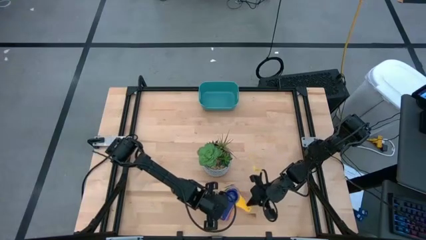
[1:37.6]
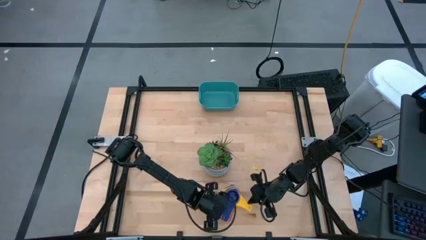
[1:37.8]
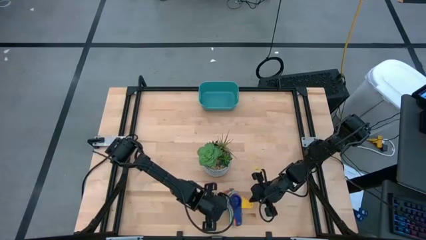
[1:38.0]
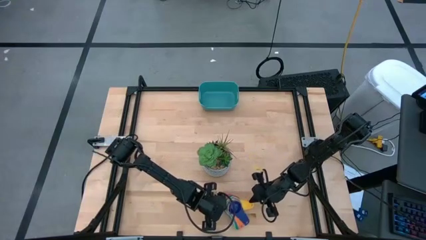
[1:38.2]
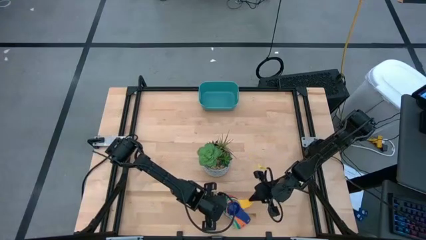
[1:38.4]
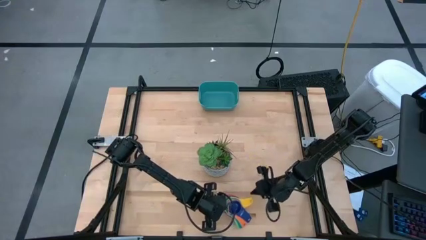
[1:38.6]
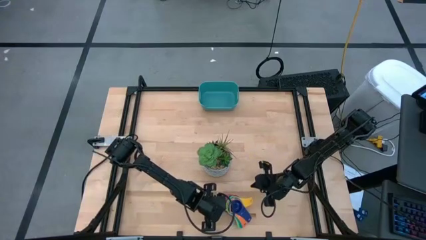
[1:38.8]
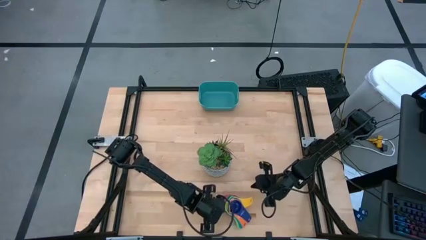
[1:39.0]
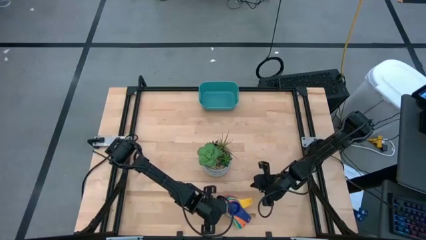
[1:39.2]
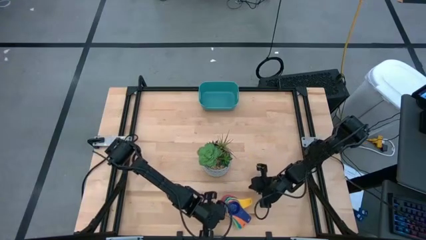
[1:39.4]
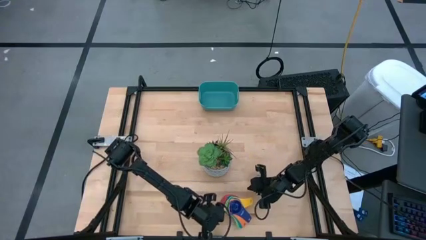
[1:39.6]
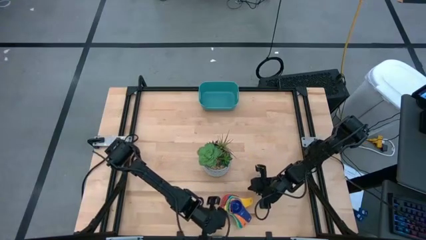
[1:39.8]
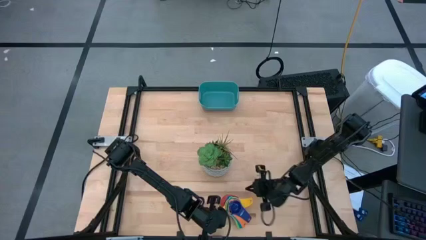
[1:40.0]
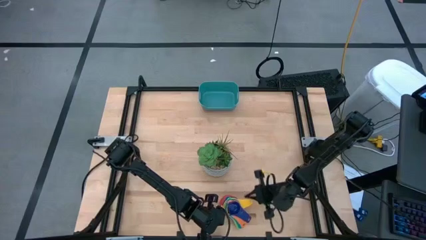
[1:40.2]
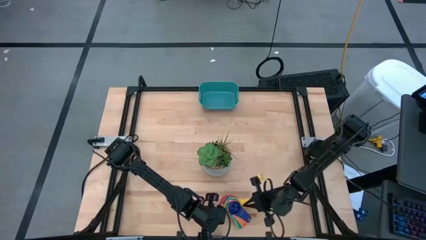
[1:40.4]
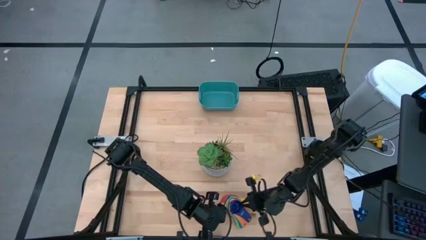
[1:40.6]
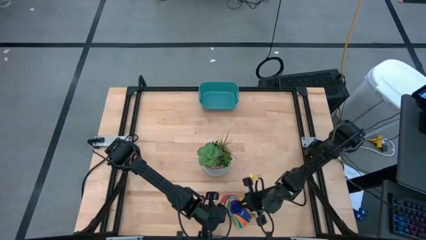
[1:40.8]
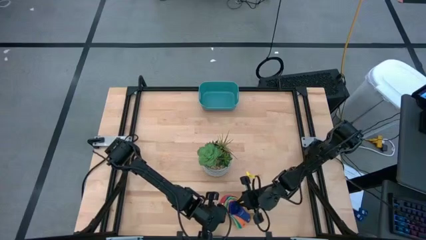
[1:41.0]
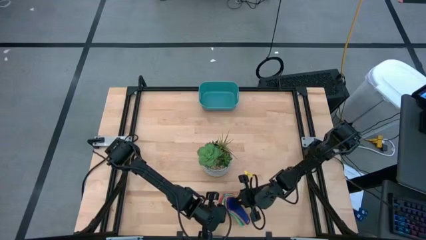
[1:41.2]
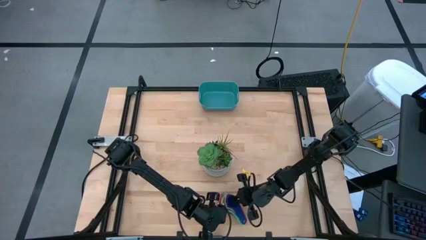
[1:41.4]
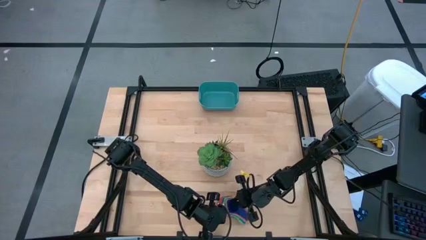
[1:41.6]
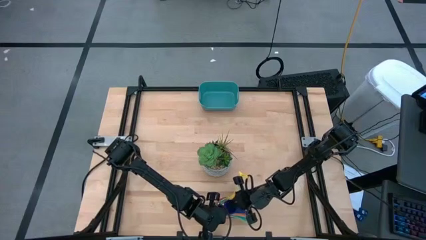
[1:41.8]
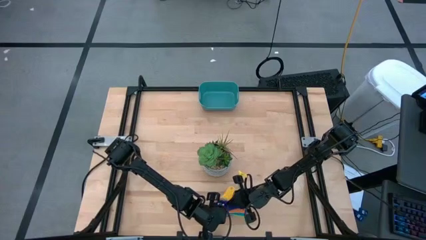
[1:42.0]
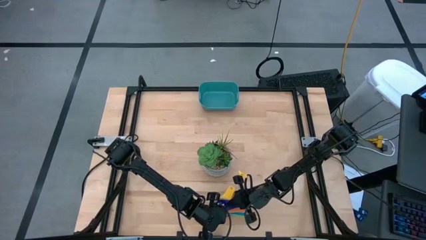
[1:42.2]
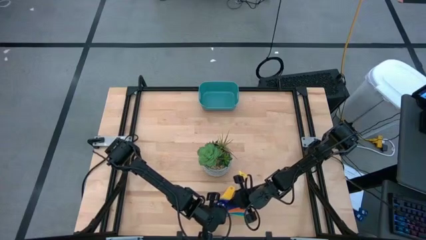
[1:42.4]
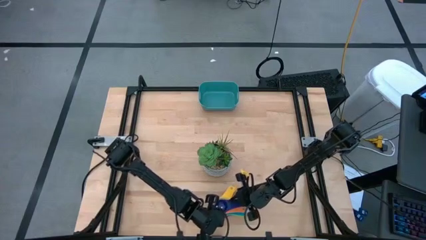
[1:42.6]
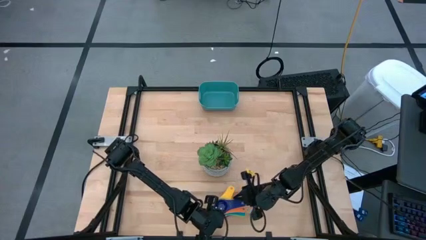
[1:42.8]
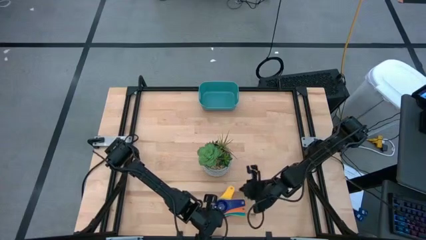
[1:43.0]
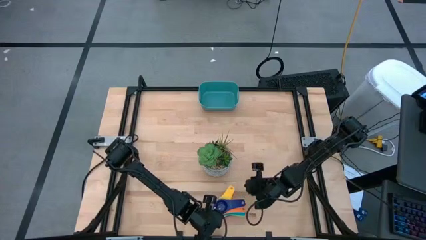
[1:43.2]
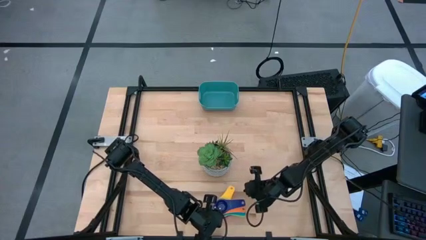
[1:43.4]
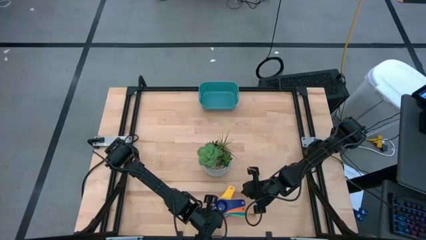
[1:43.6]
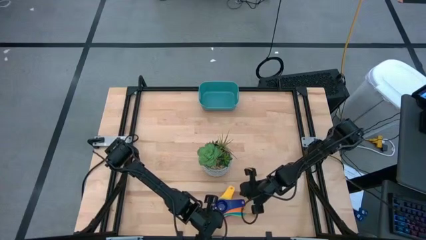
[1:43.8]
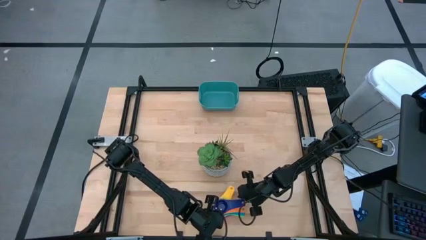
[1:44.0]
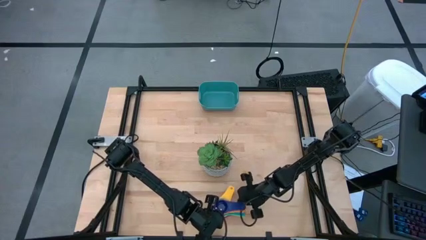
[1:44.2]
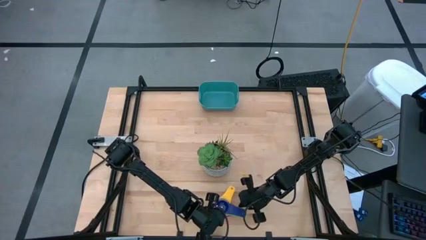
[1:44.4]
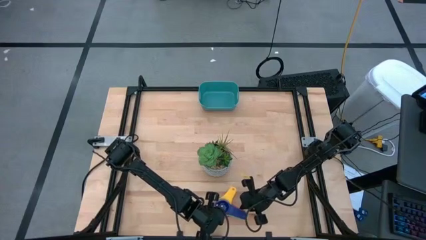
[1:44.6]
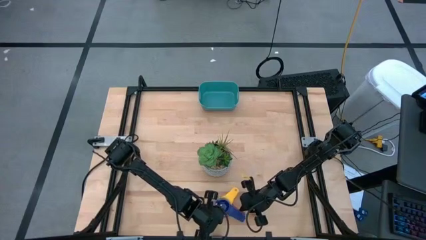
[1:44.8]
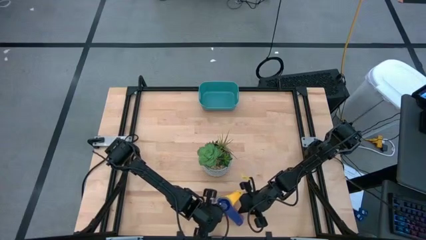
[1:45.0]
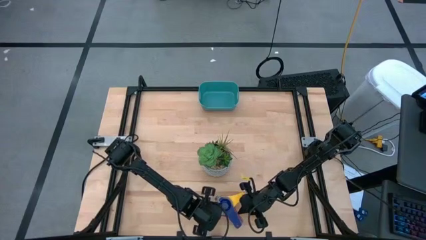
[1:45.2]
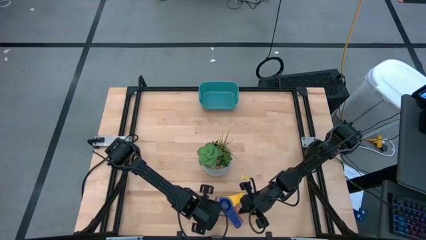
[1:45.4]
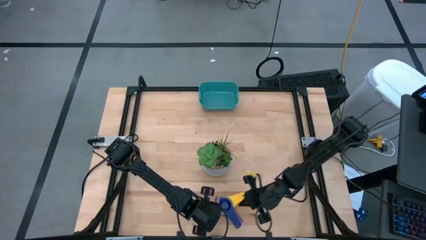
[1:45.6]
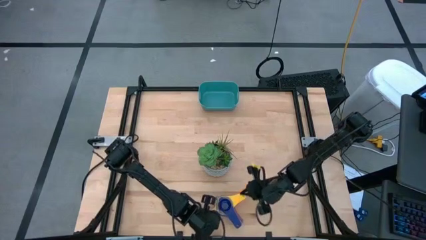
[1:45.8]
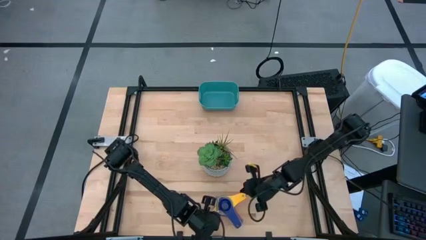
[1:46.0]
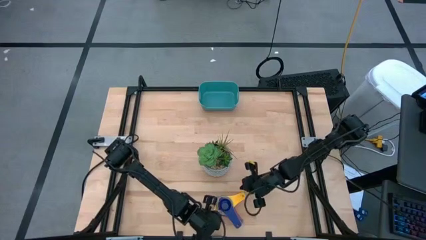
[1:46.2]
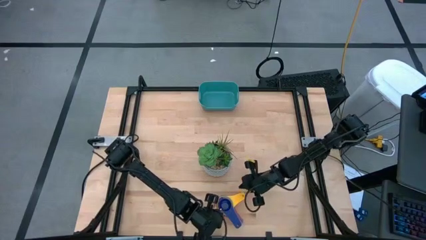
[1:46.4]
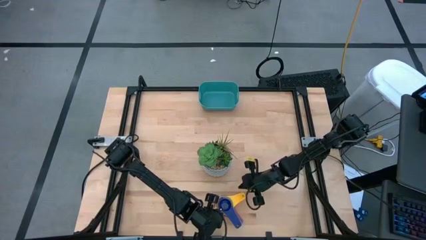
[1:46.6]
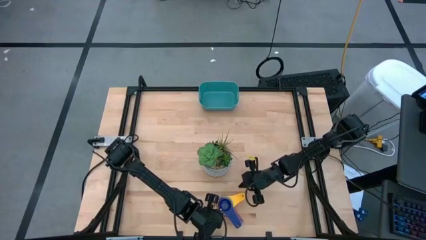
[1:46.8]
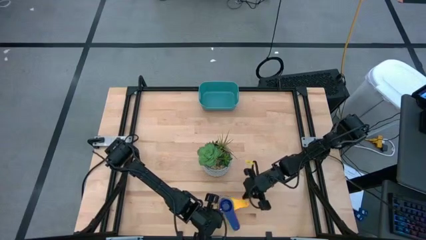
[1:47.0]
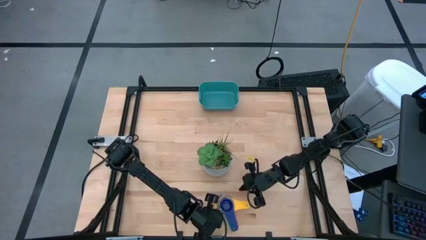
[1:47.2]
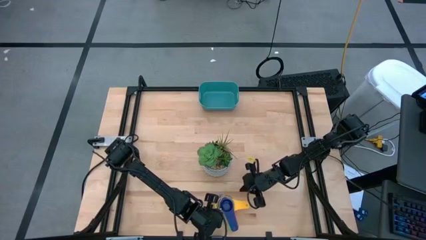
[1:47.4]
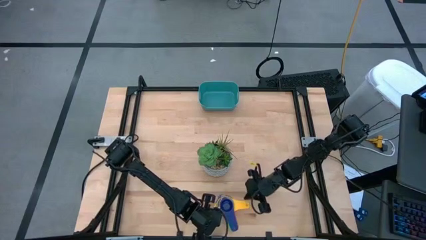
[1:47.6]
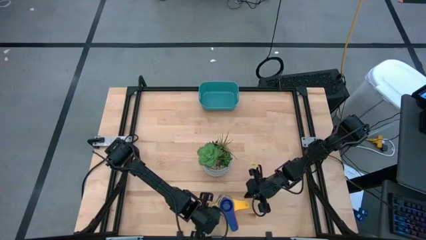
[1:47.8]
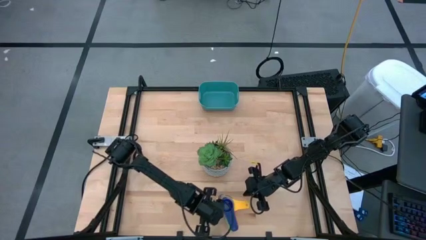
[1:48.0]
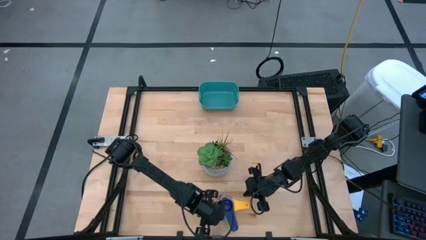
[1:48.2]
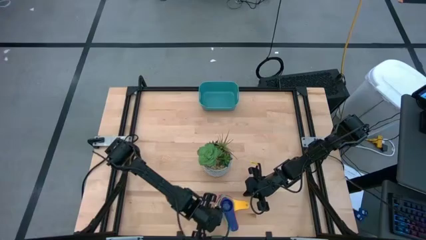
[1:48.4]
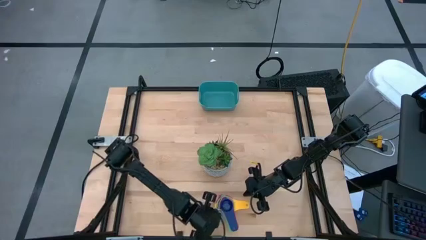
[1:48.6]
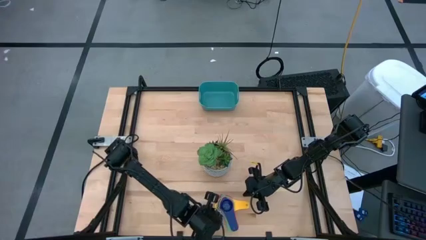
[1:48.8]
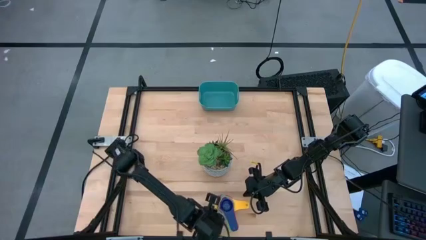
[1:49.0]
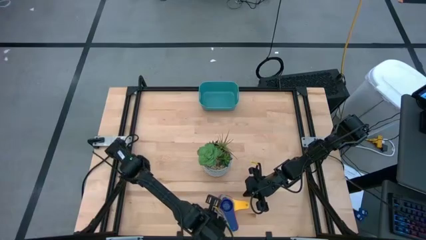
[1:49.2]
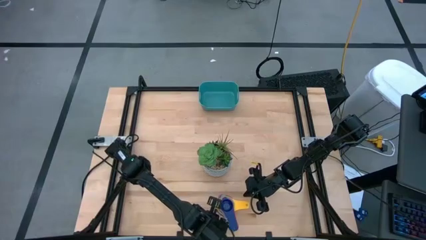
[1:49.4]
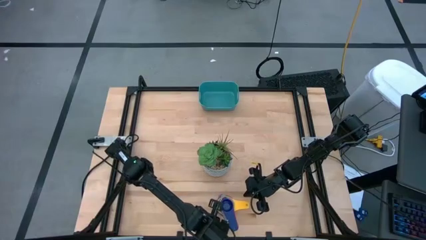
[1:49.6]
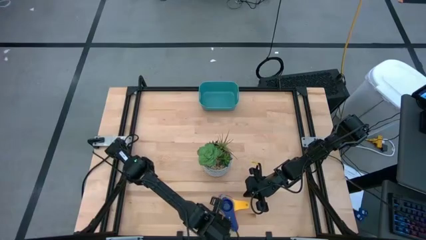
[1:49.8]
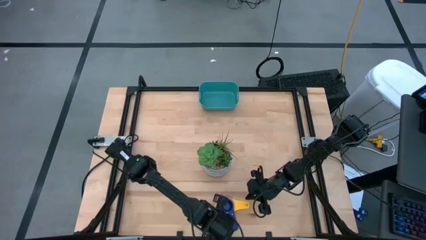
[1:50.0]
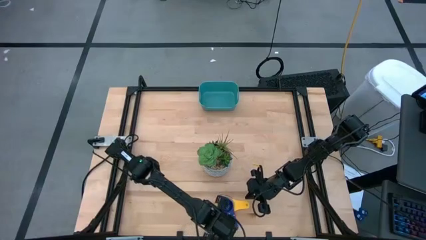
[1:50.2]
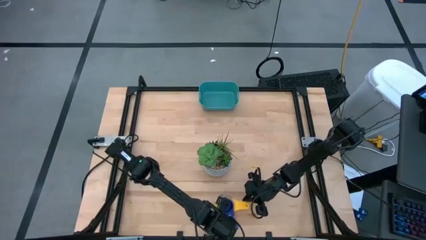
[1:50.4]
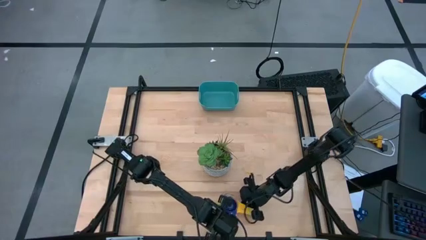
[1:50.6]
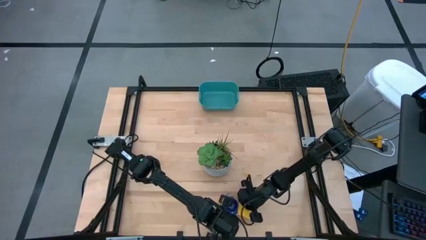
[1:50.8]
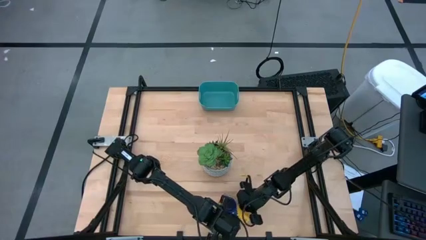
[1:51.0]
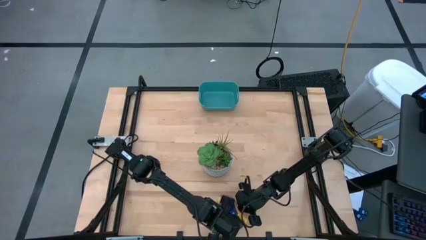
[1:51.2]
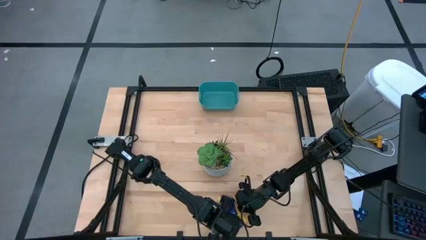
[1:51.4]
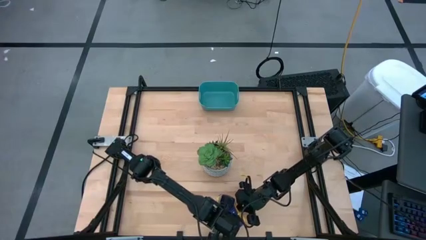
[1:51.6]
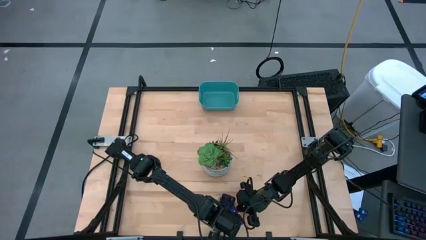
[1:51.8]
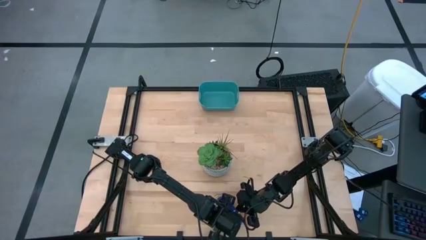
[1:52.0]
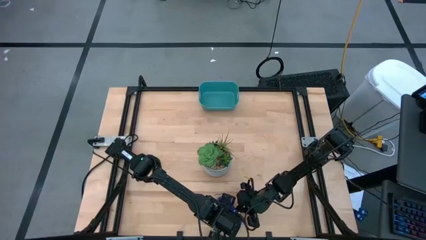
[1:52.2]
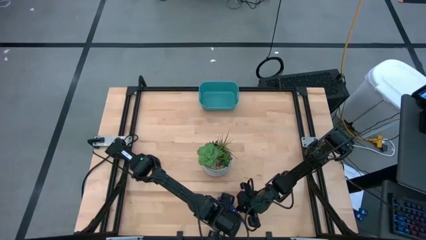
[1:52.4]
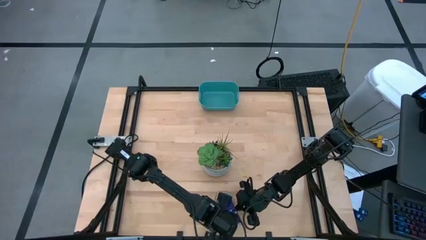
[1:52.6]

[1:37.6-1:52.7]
Task: Nest measuring cups in basket
Adjust the nested measuring cups
